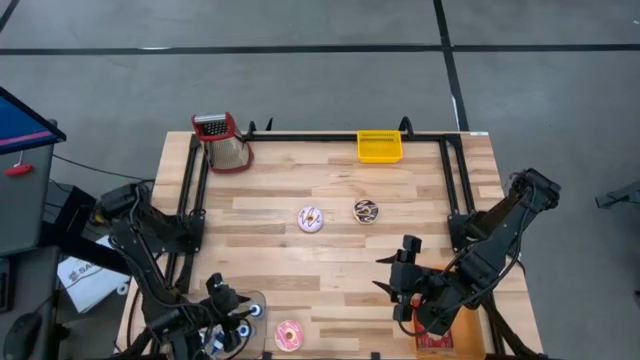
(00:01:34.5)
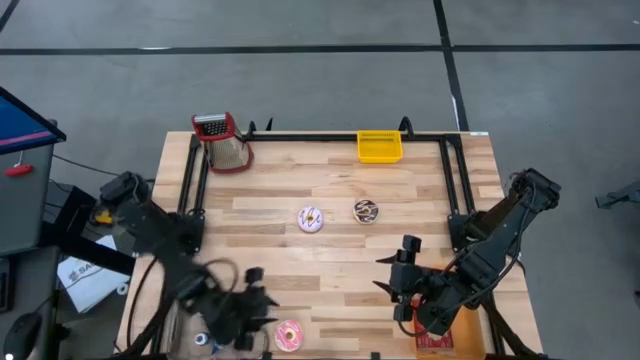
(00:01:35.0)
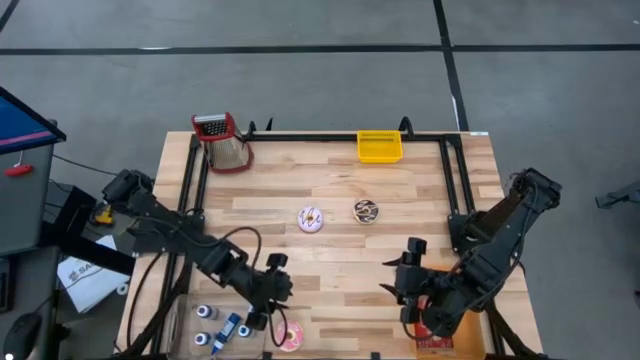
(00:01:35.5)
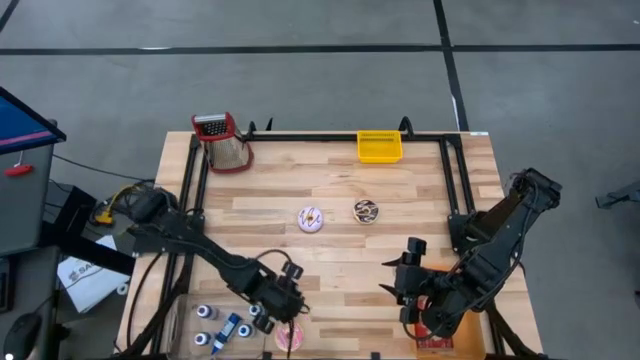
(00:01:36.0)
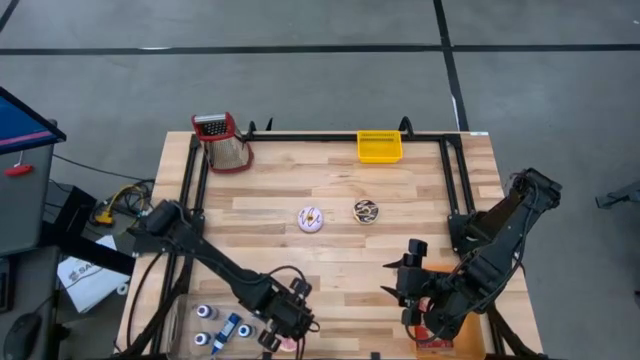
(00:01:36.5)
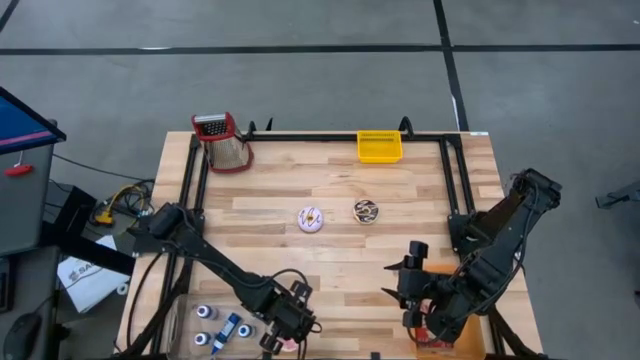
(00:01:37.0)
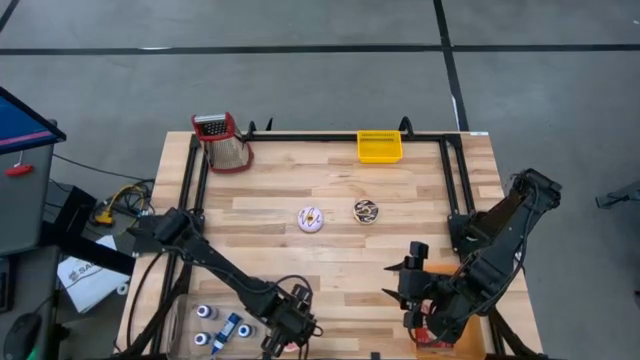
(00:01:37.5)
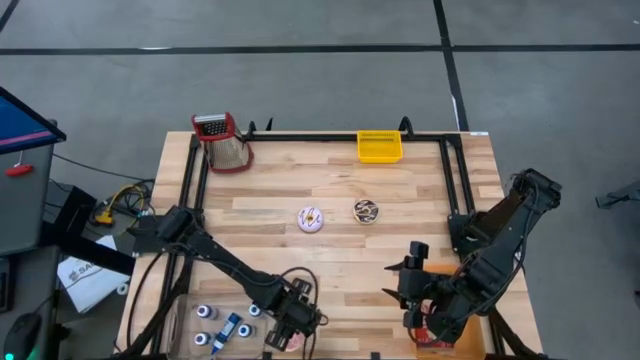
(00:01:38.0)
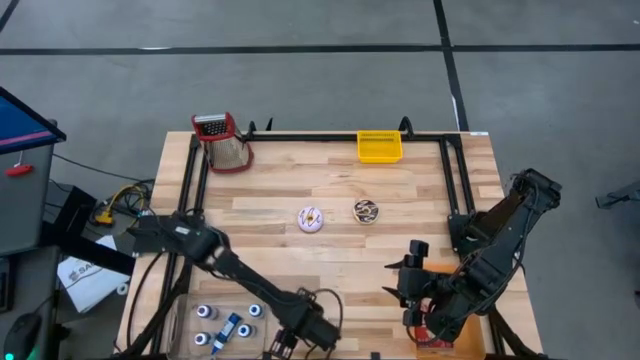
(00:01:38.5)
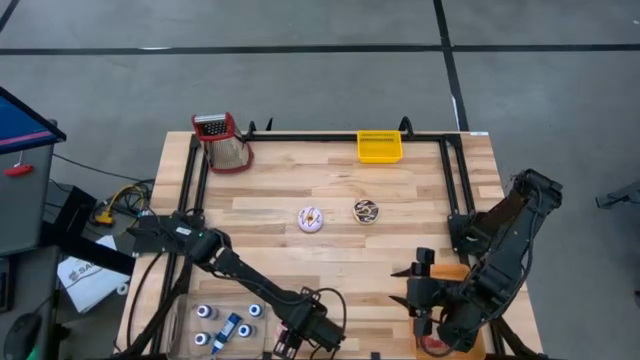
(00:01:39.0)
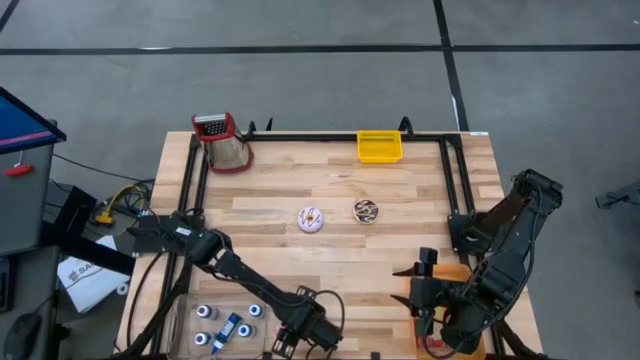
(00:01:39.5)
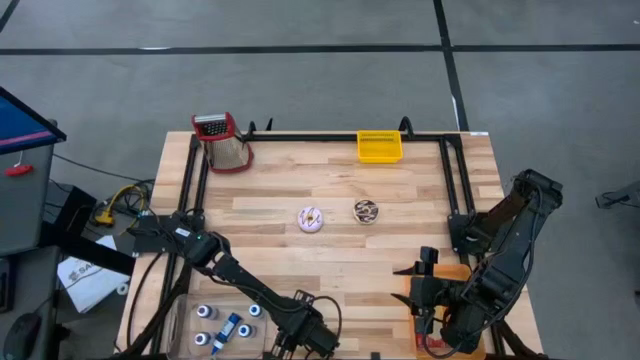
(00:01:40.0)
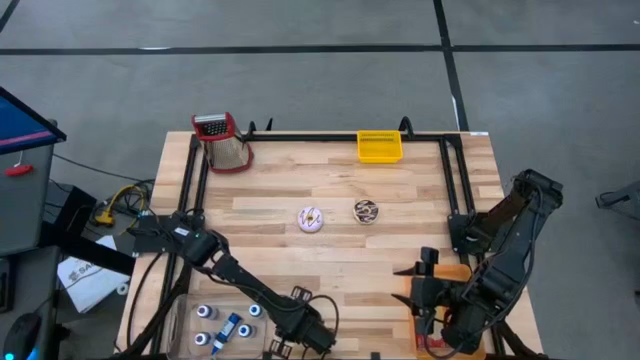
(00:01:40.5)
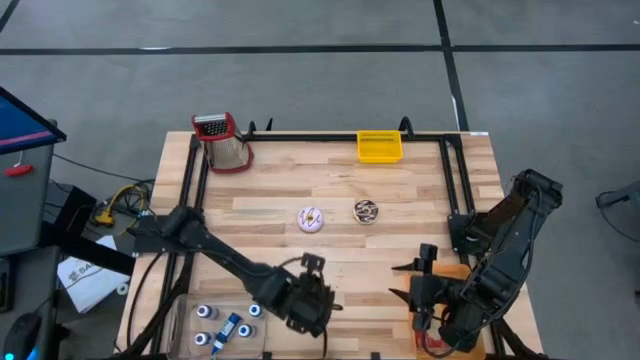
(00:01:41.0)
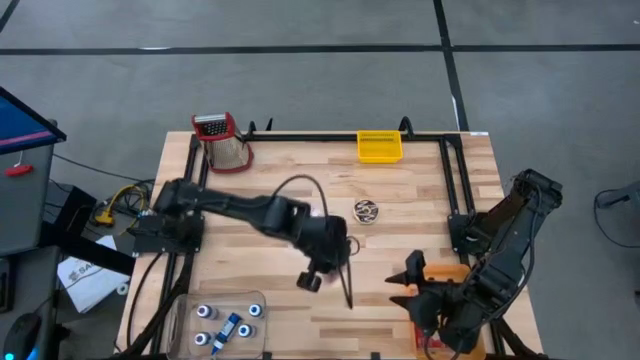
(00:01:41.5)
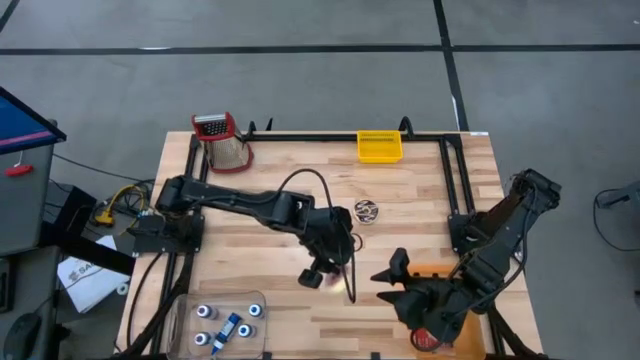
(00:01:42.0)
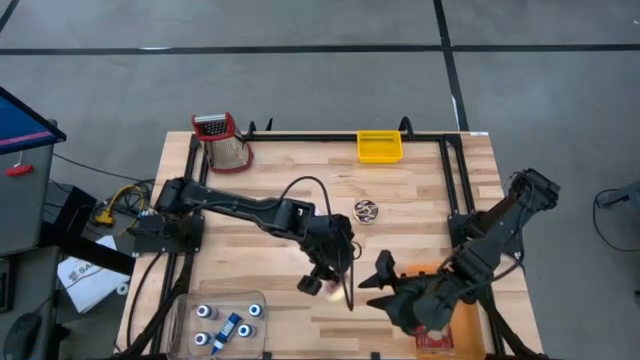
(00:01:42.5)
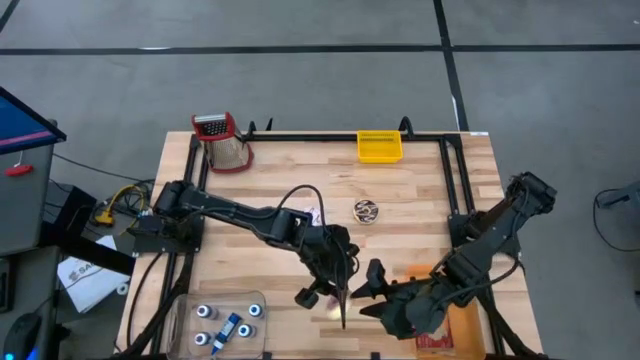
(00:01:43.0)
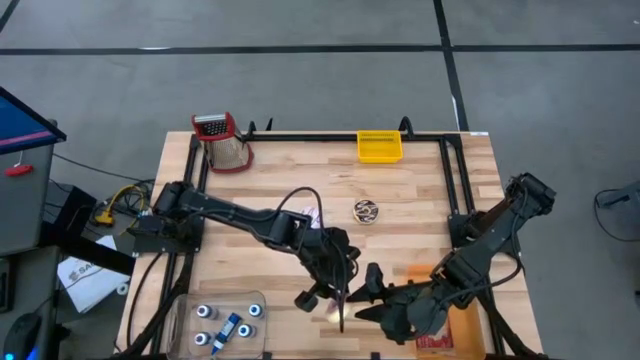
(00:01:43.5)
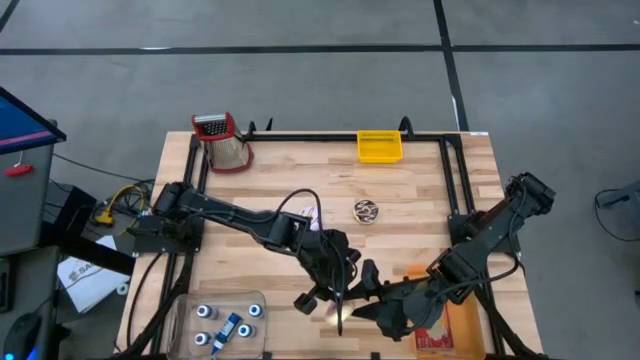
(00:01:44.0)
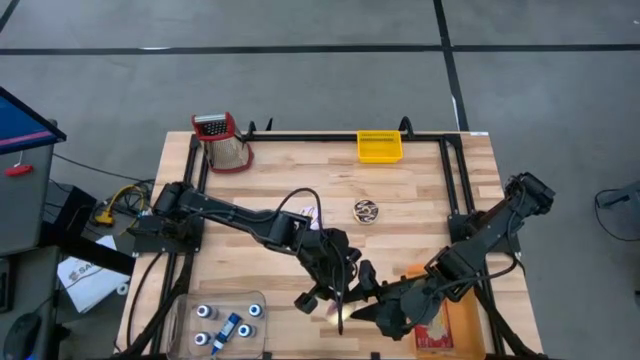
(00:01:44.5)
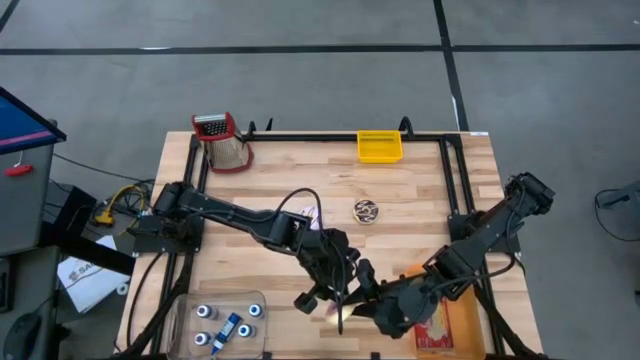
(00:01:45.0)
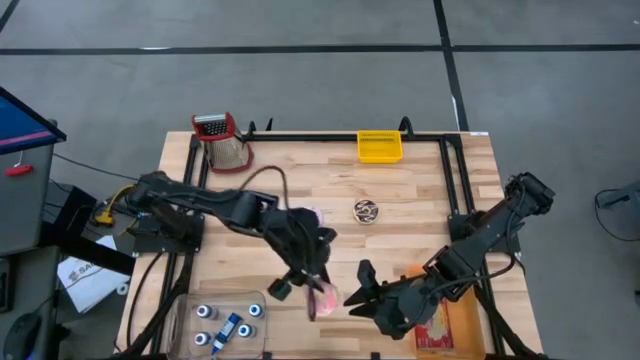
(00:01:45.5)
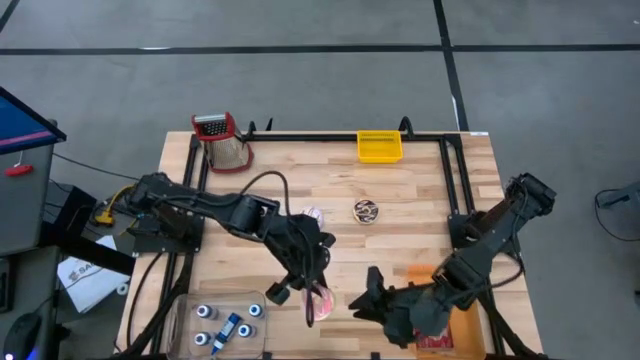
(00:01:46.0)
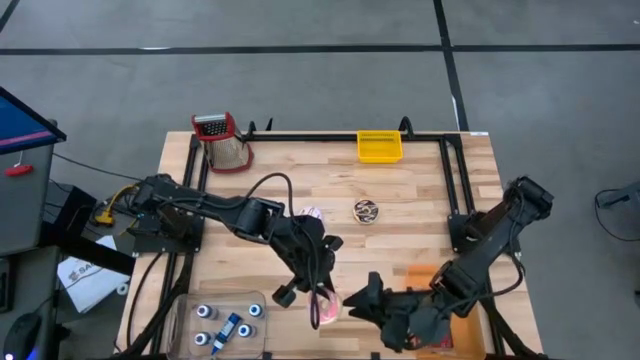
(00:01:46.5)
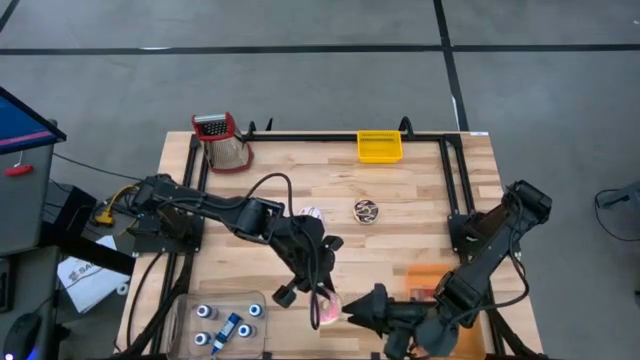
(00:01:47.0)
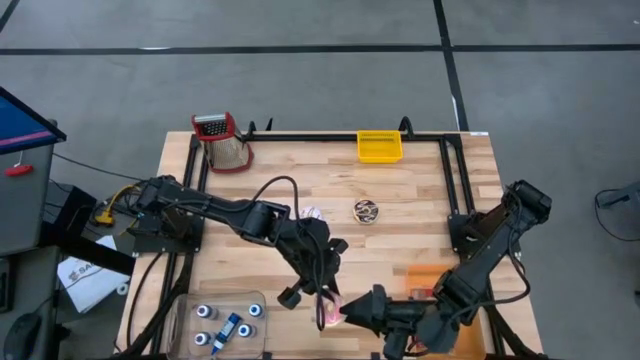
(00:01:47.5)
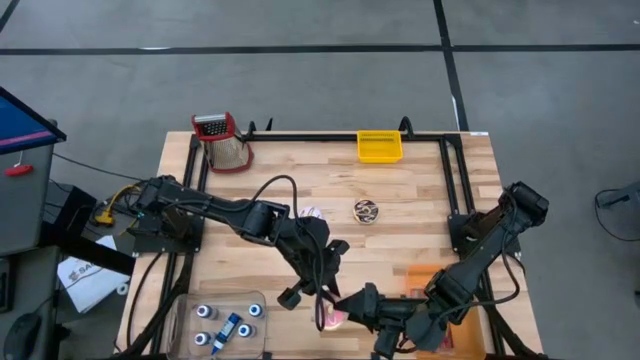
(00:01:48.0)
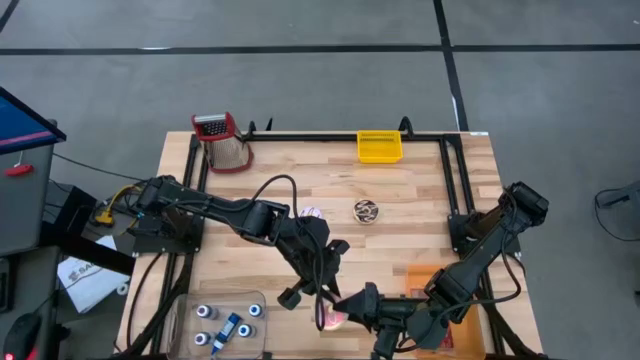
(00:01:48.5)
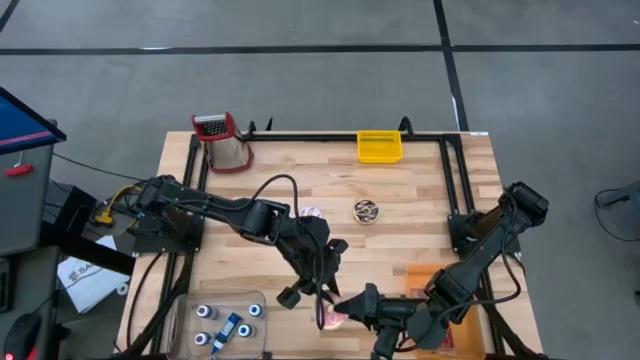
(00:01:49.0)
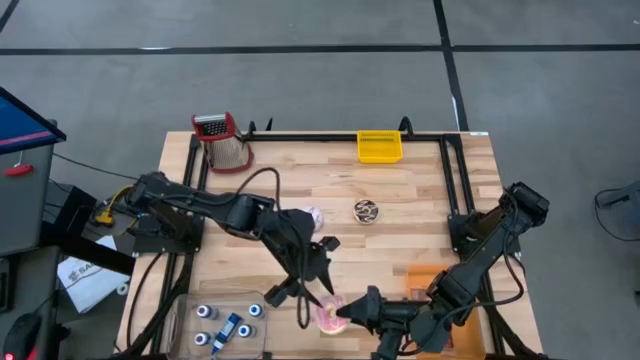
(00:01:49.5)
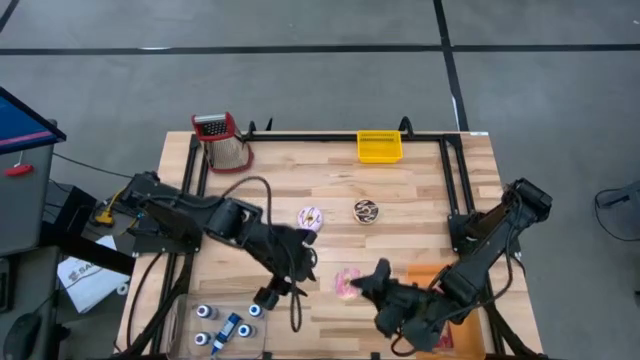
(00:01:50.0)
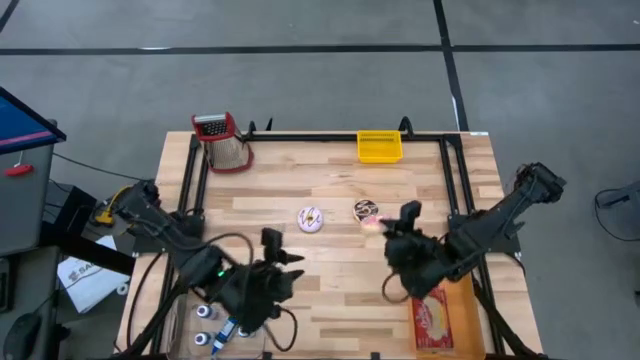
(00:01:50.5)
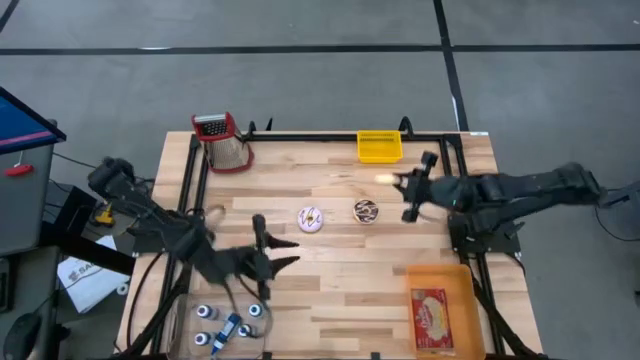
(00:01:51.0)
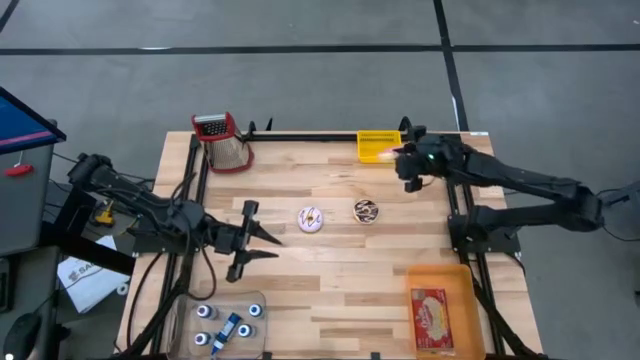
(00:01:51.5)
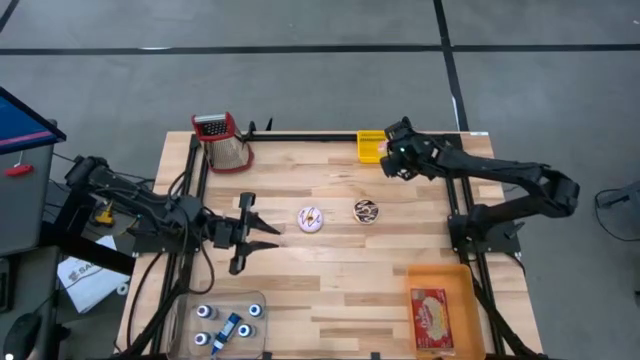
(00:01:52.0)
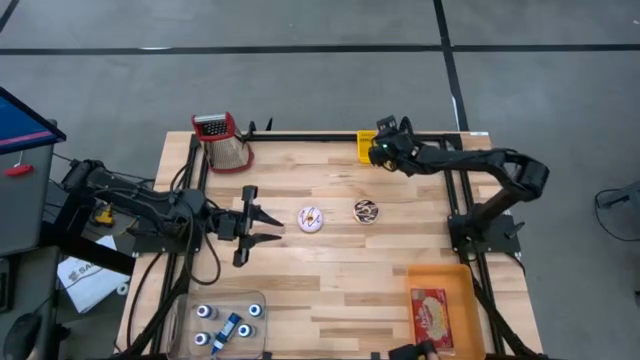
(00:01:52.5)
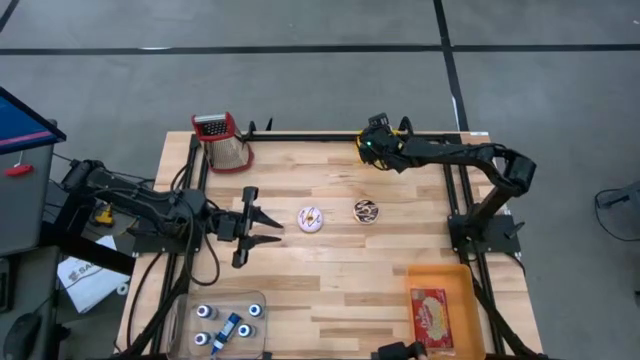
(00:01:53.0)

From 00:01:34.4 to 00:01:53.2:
Put the pink donut into the yellow bin
